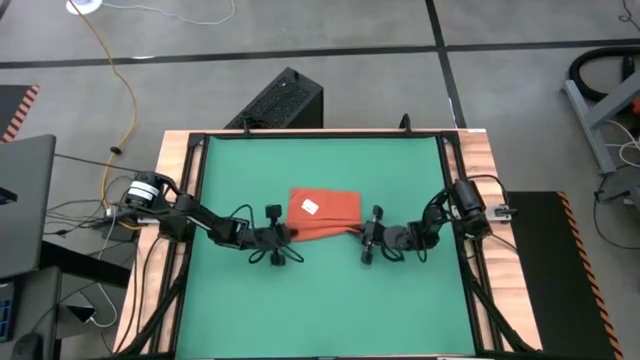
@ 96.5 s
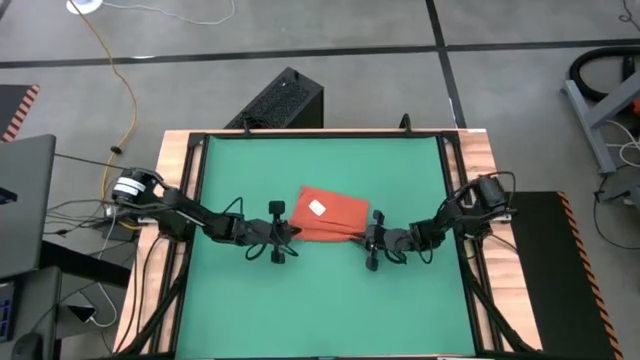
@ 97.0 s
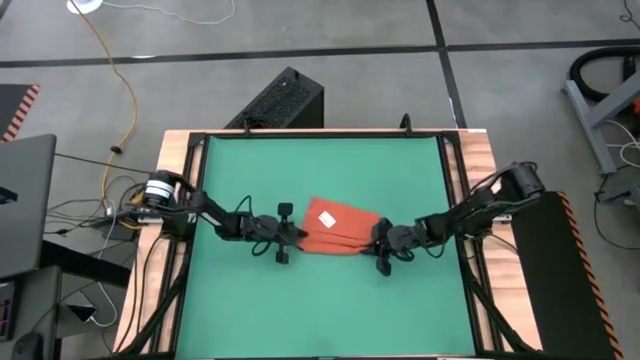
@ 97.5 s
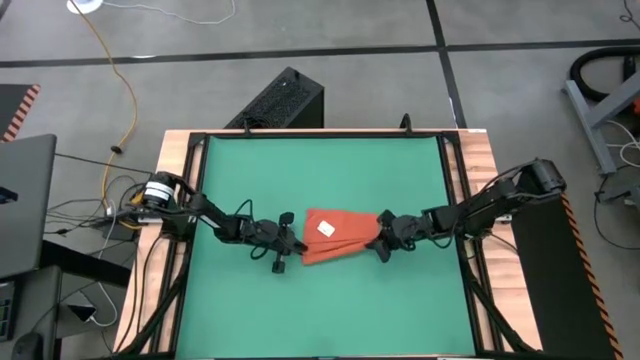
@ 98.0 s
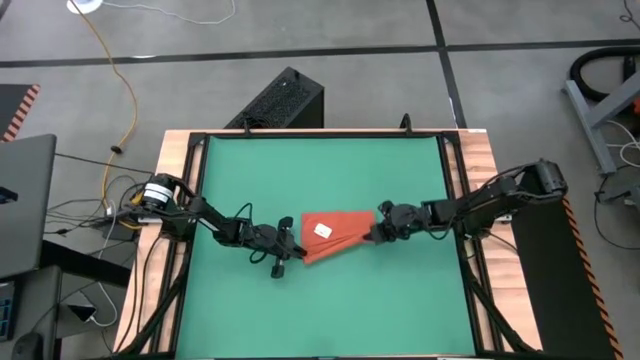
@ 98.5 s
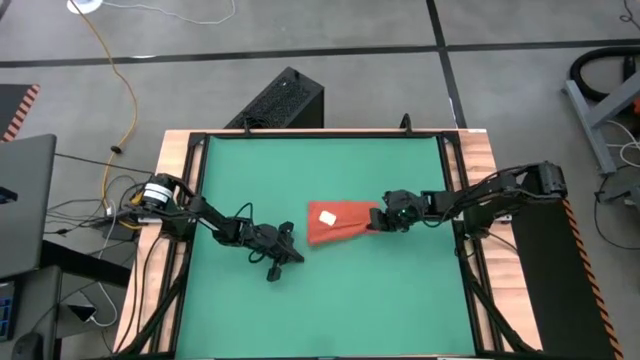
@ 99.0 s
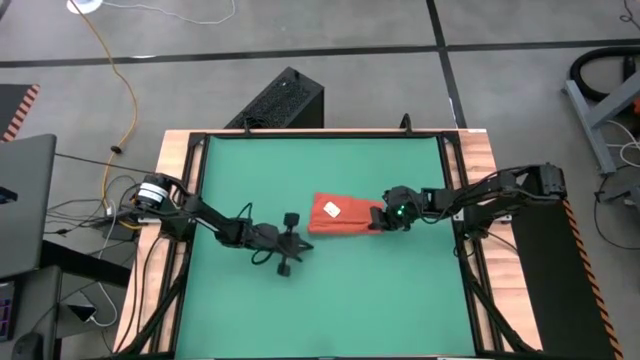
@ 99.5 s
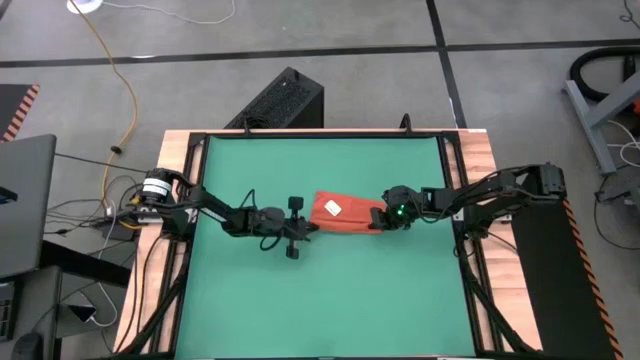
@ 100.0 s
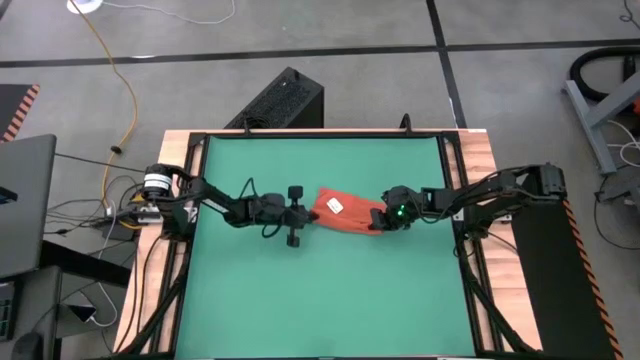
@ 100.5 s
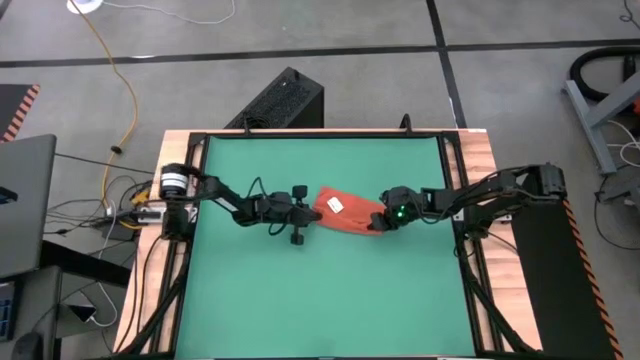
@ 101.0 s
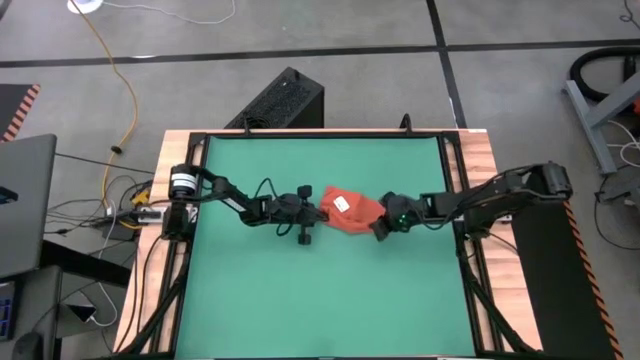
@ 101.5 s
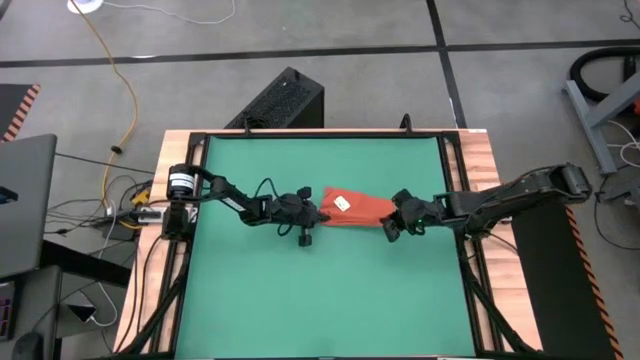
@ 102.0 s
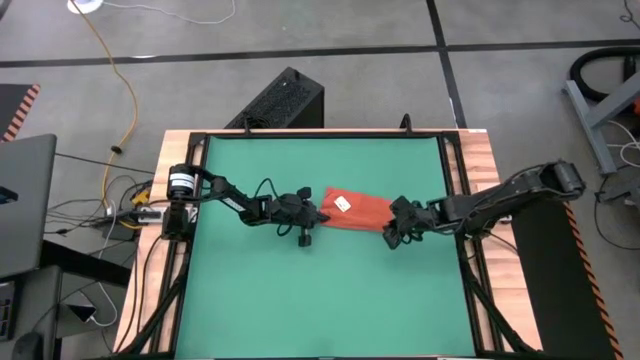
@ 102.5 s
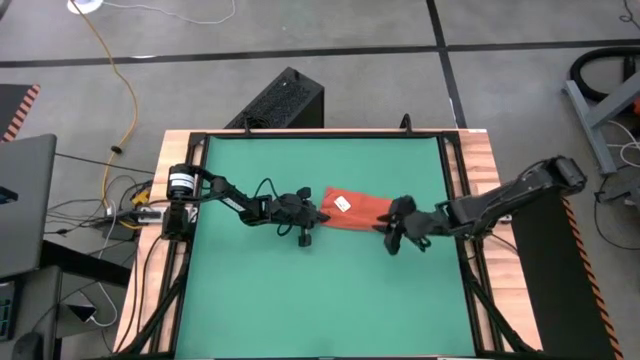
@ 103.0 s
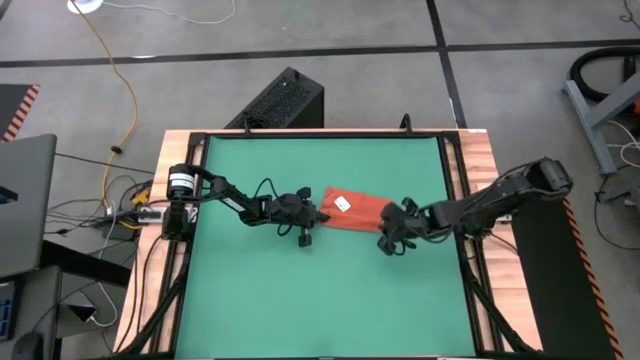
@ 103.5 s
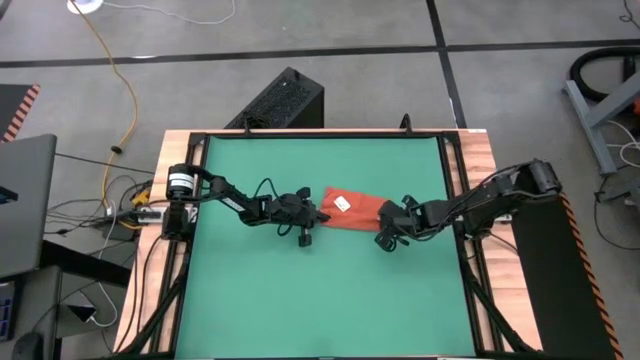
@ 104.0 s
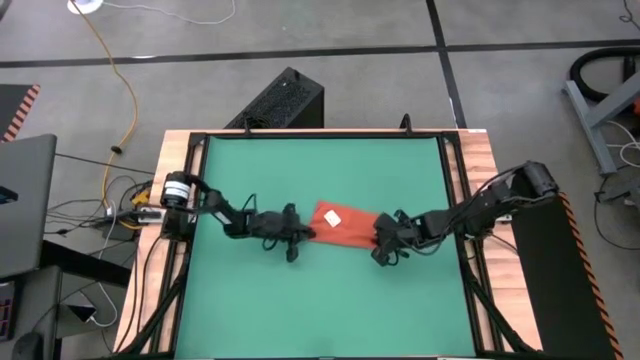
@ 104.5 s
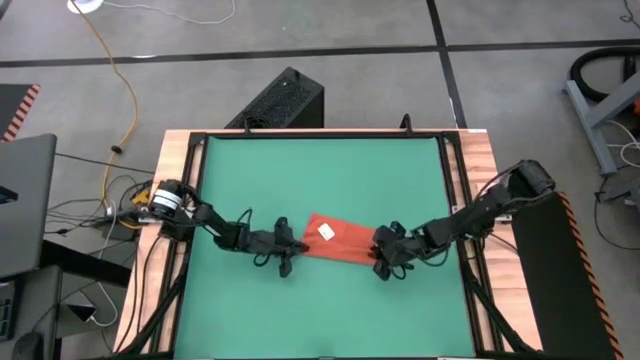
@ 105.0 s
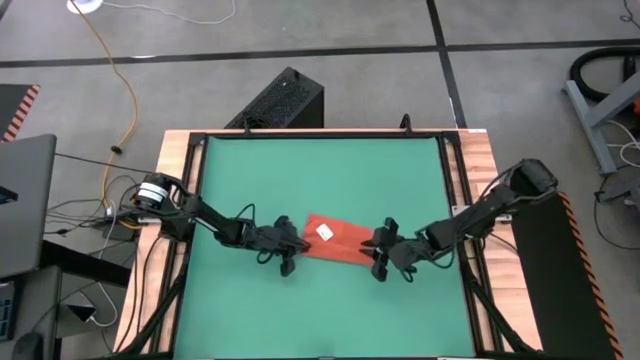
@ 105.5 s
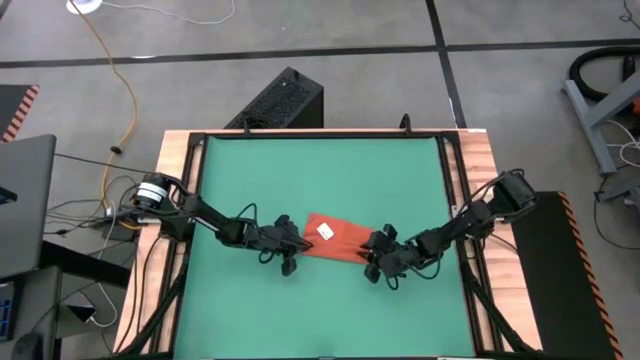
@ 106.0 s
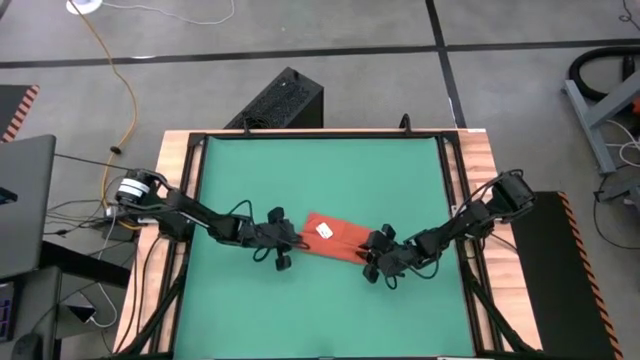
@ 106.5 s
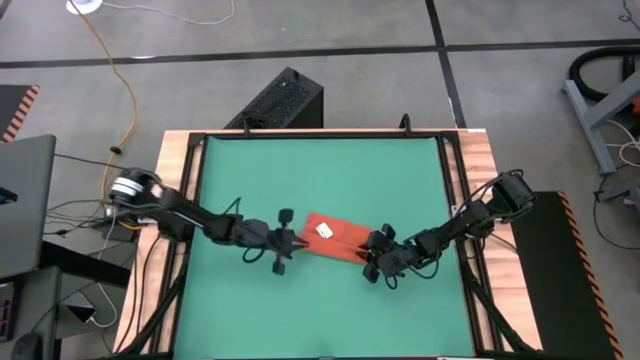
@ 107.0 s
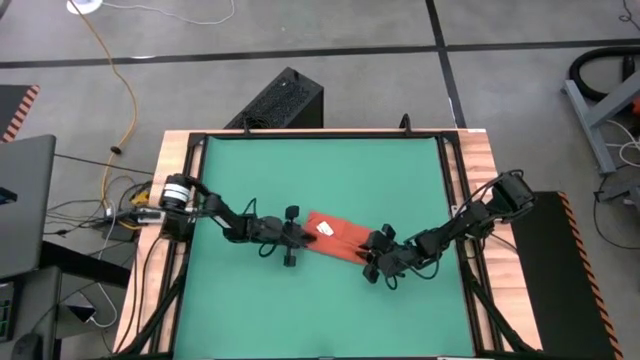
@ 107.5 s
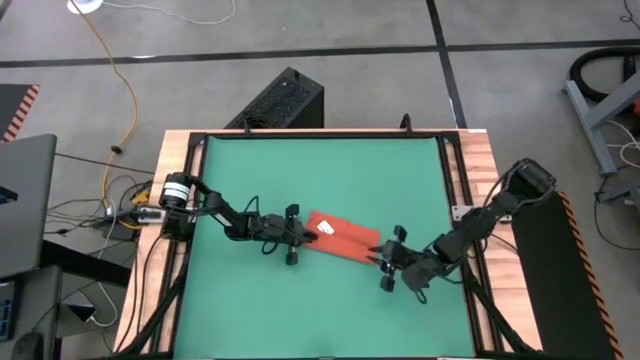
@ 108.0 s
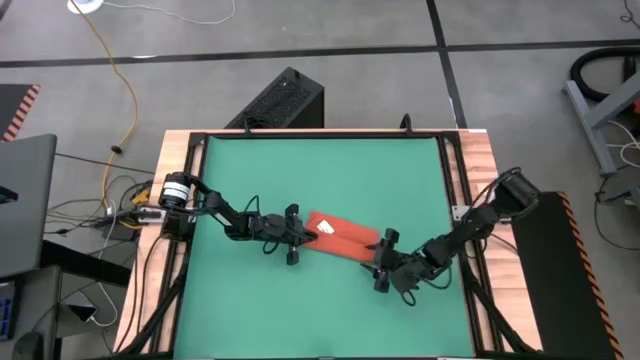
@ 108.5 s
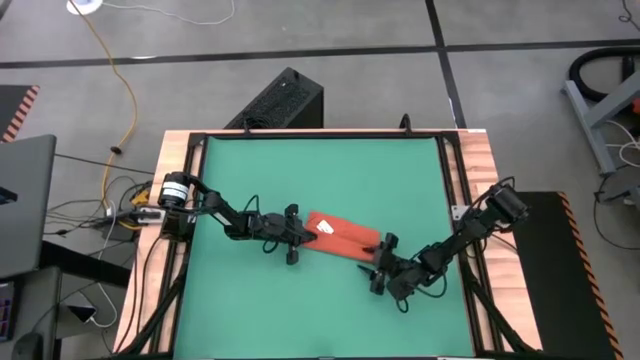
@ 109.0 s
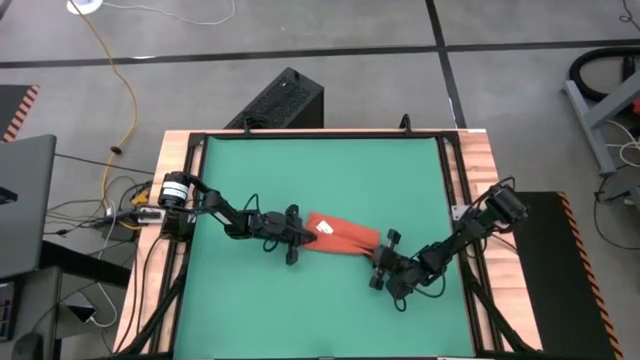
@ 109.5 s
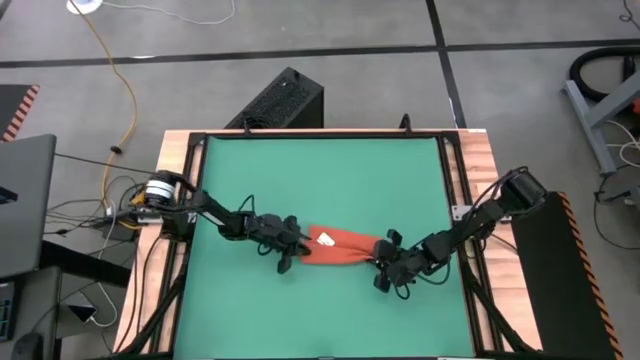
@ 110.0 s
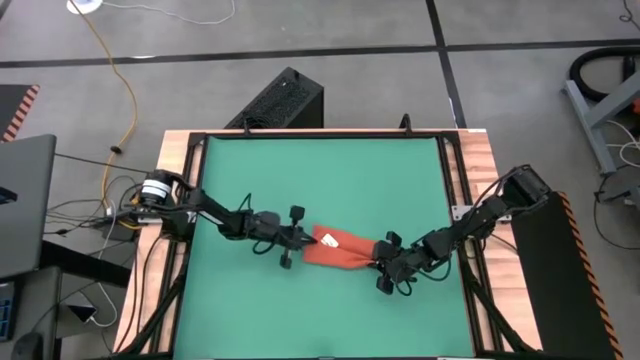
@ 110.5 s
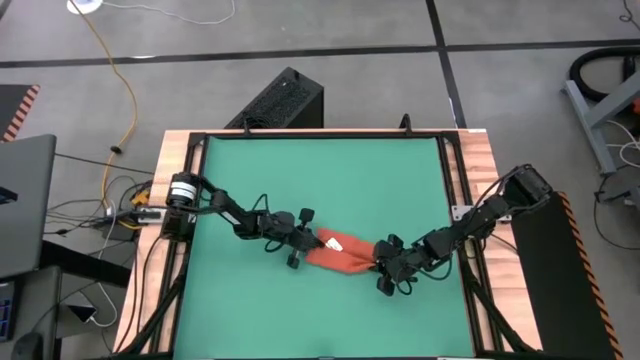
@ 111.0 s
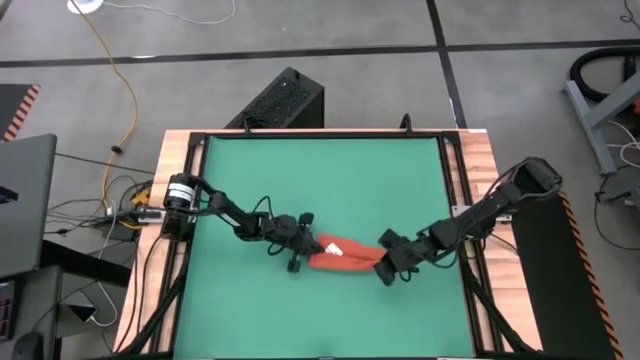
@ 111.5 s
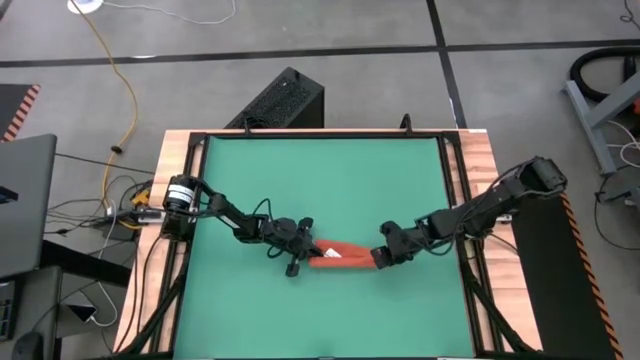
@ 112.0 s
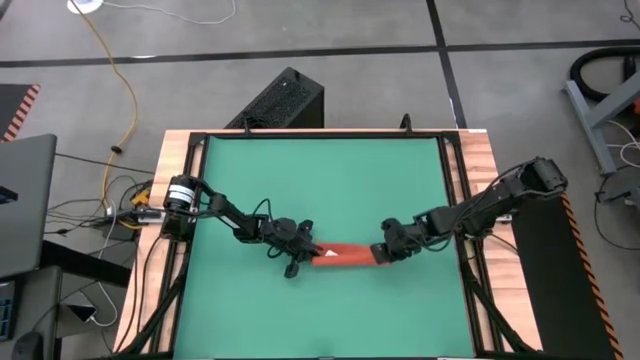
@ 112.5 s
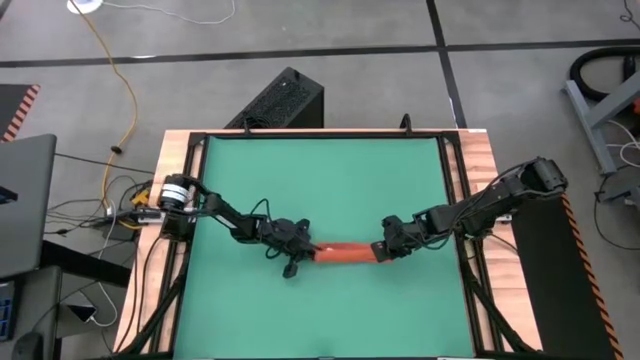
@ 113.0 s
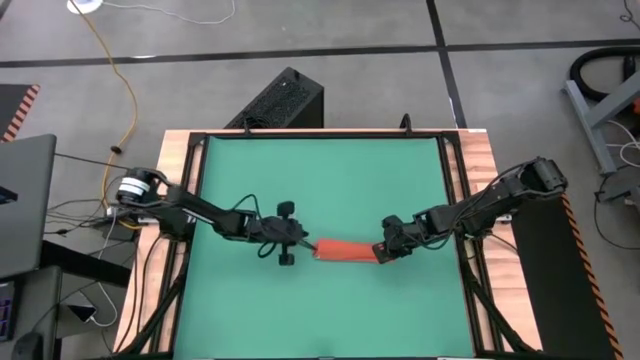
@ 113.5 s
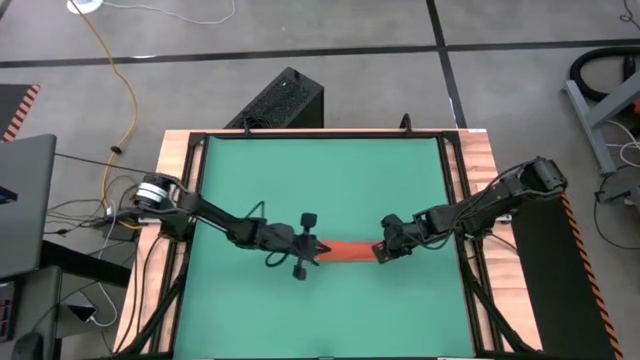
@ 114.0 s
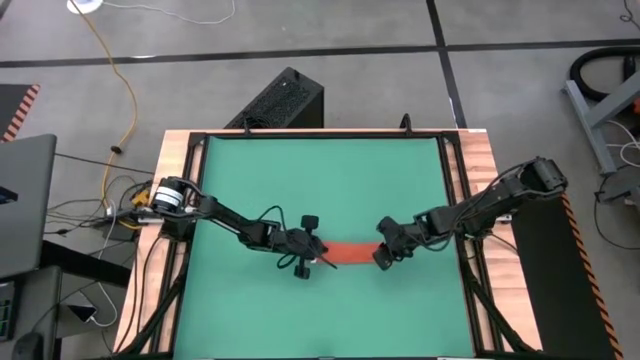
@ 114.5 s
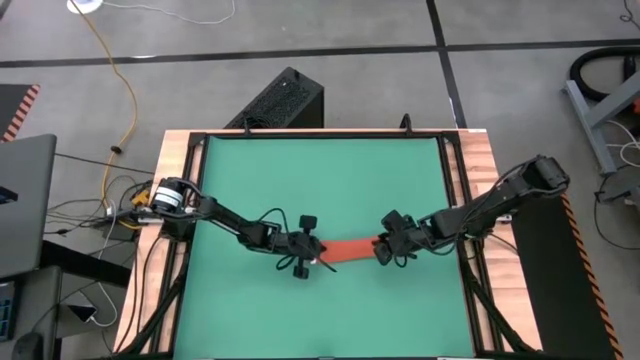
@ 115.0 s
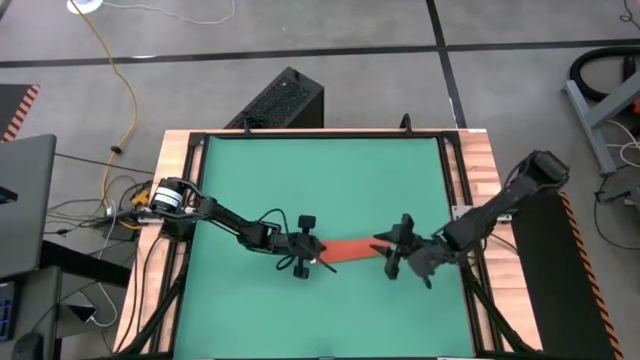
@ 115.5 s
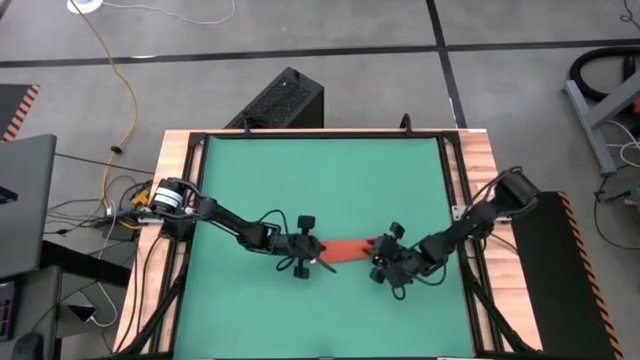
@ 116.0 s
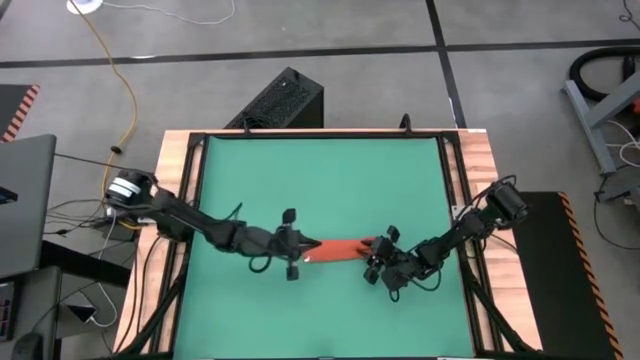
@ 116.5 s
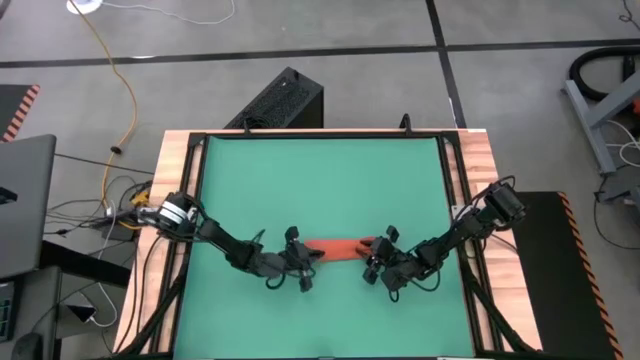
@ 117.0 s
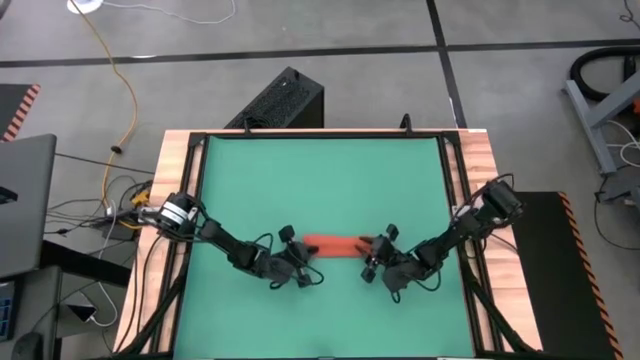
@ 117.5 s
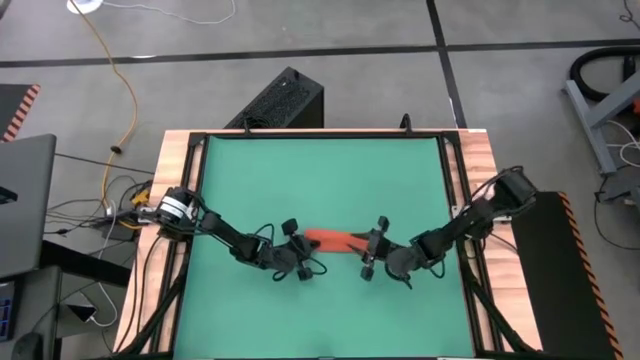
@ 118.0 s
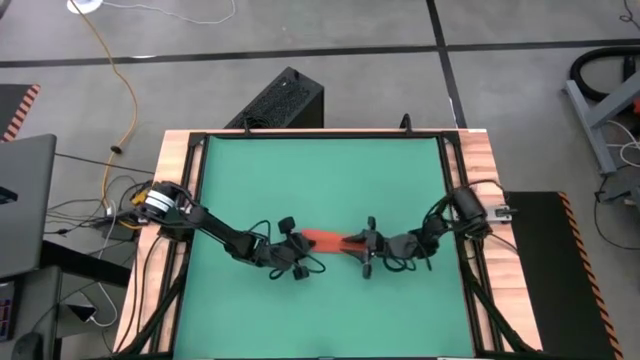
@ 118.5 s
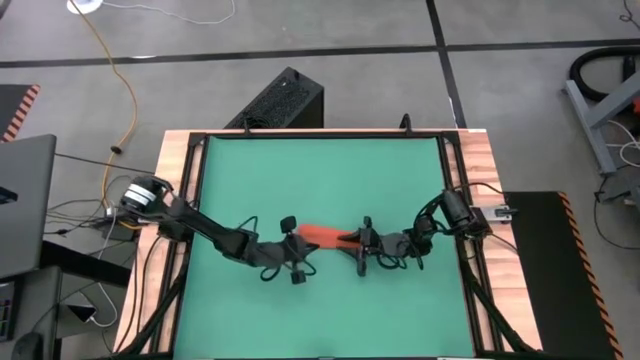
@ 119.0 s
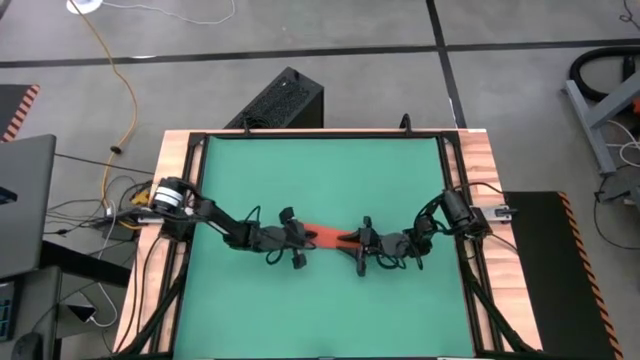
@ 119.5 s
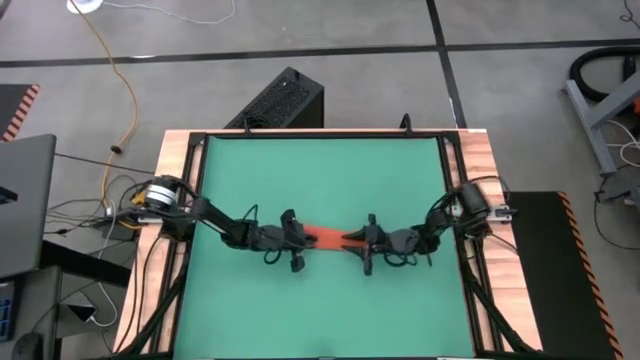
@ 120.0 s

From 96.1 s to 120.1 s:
Task: Roll towel
Roll the orange towel
